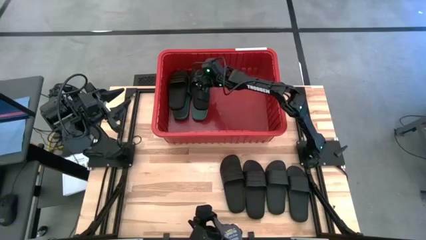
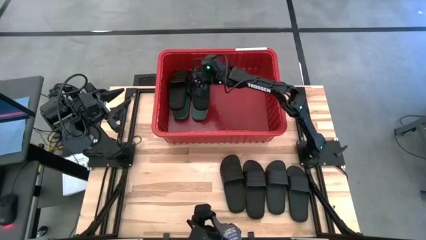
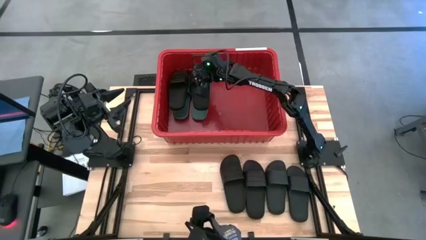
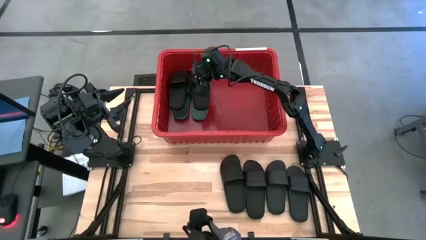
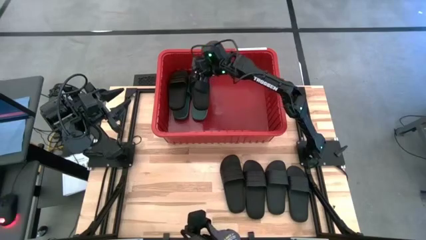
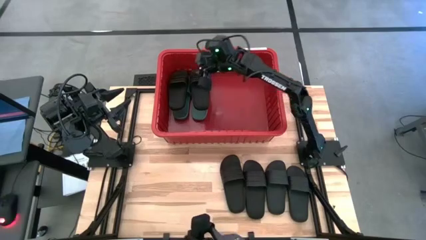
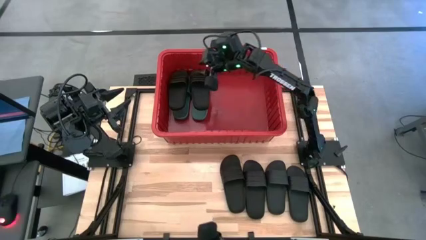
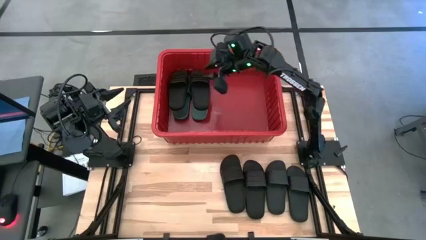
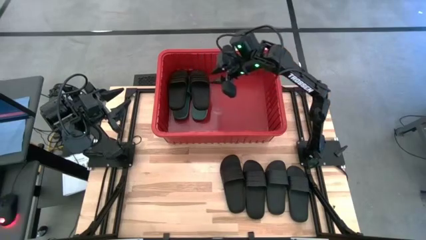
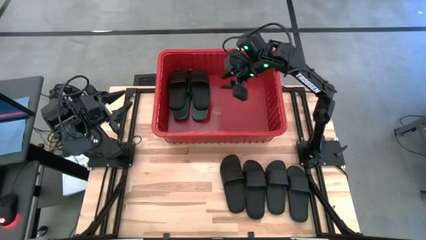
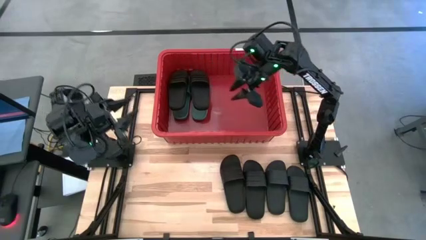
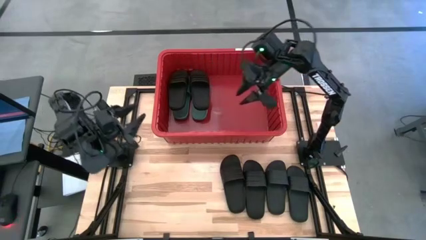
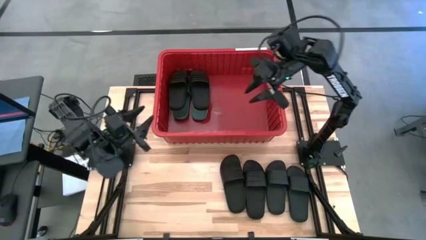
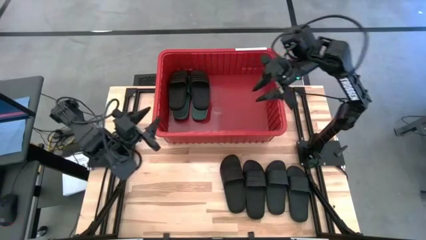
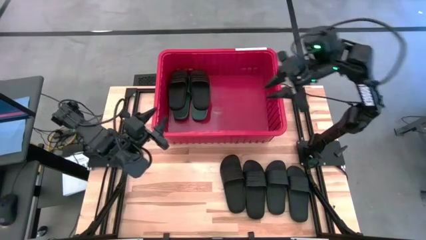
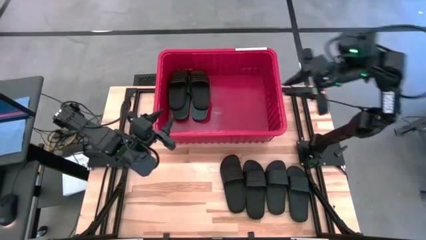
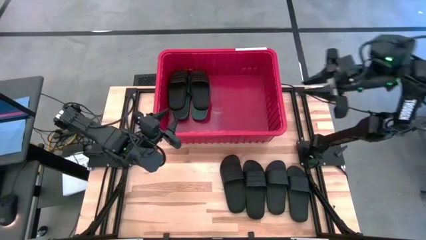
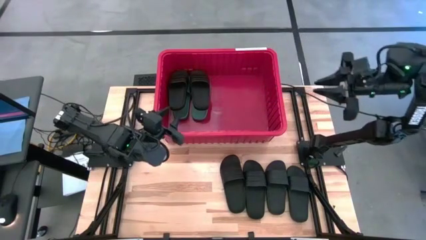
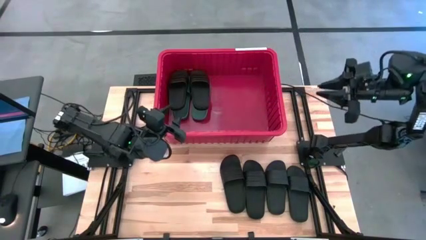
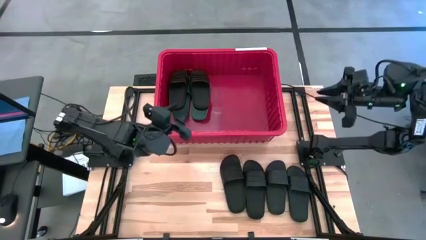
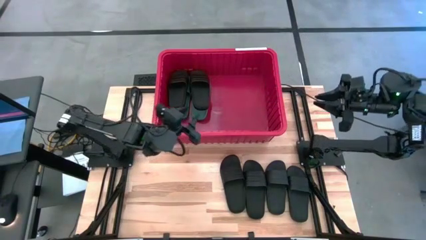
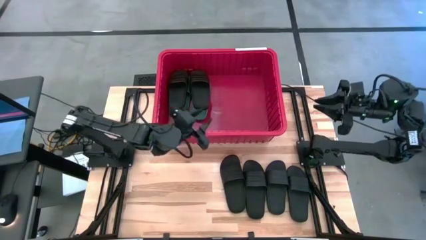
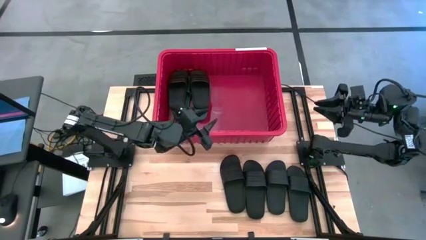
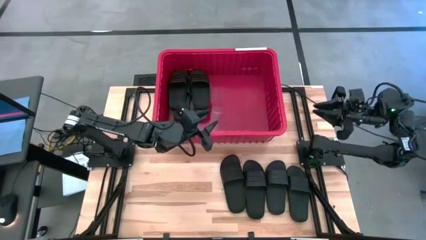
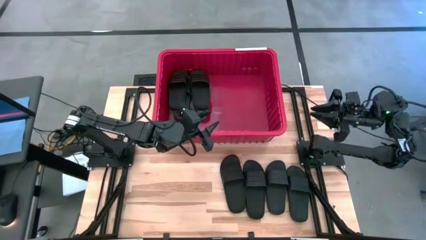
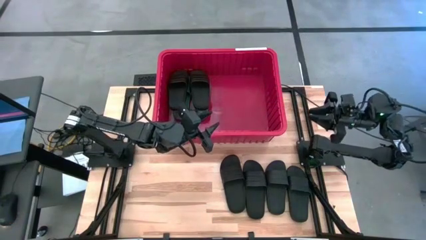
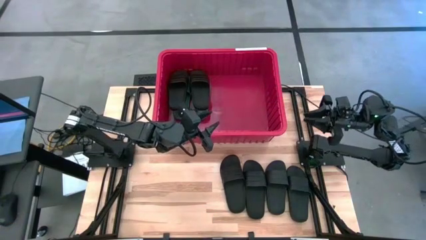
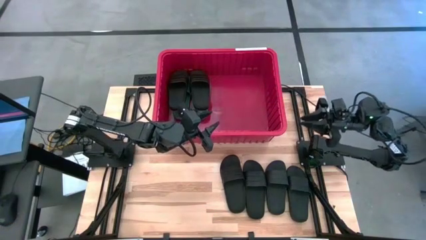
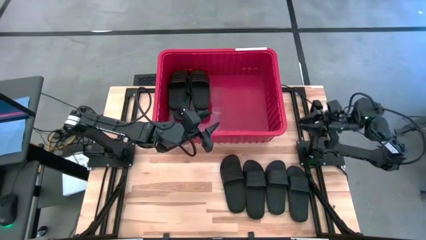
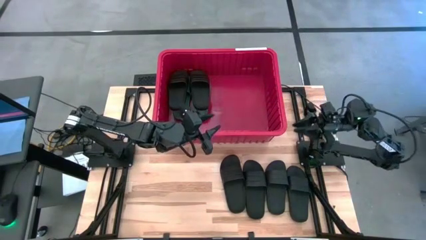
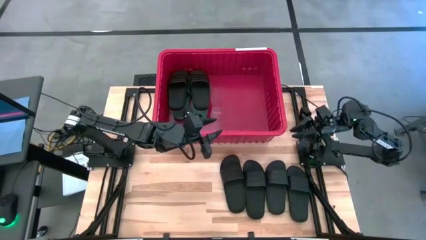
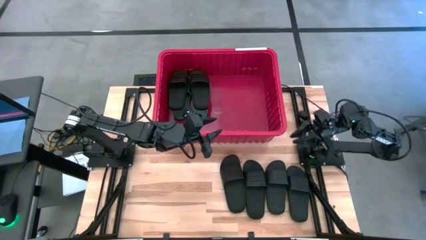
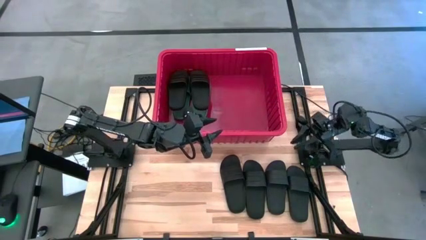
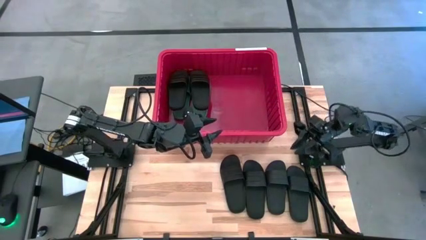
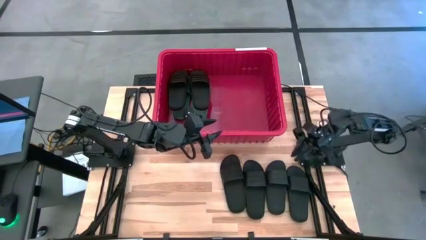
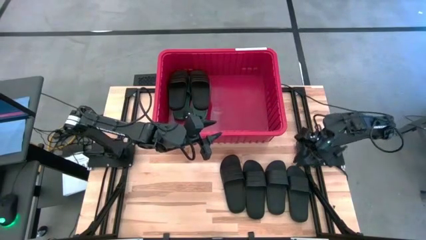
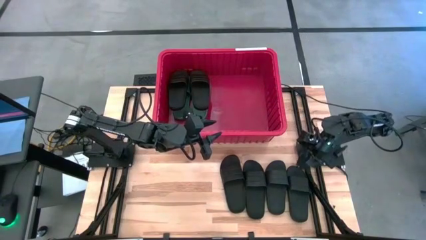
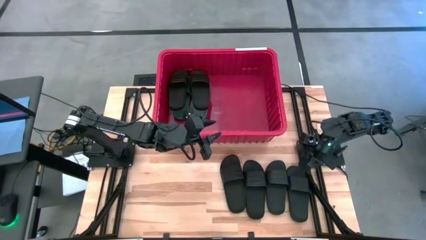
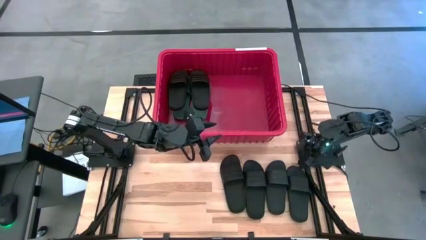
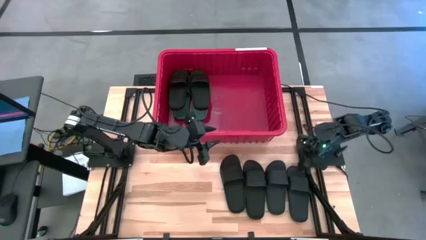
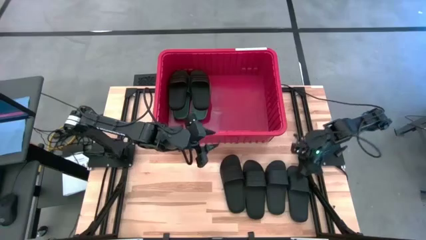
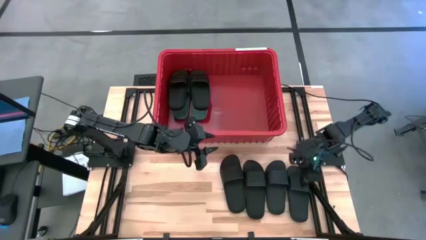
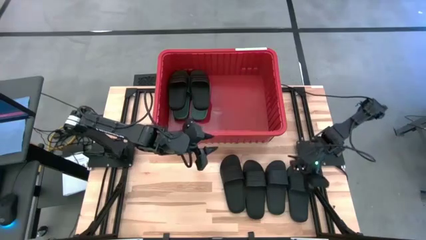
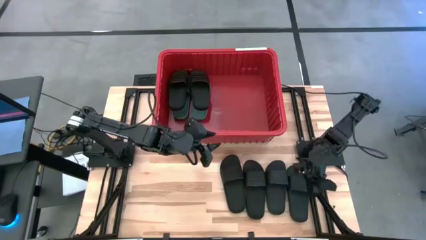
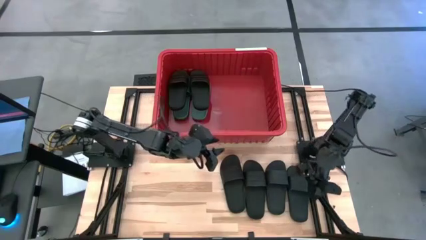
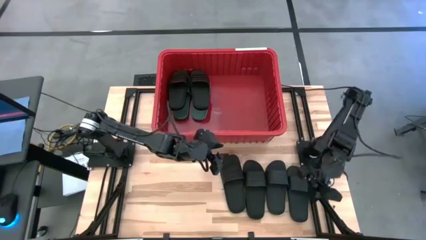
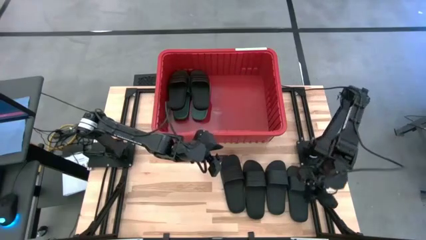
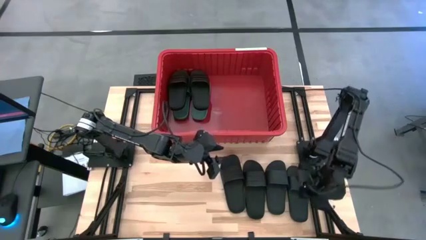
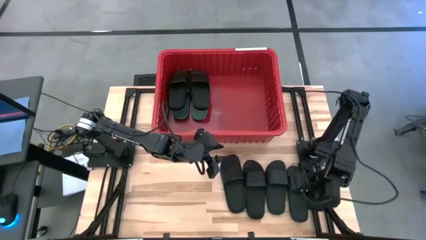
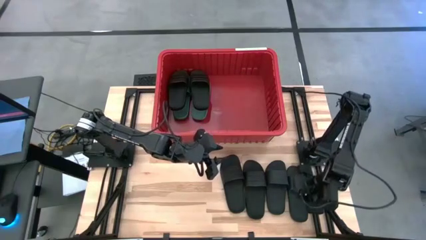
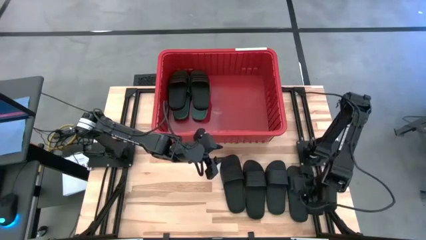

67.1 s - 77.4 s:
Task: Pick and place slides into bin
Put the black slide into the red bin

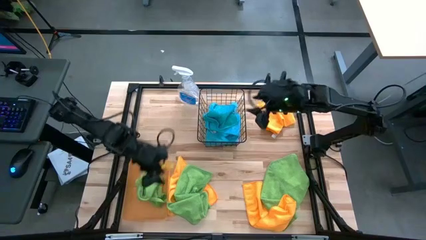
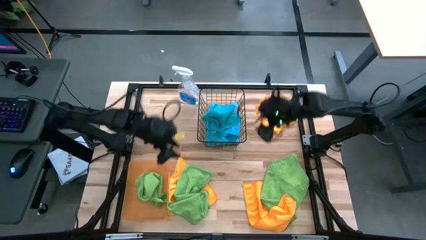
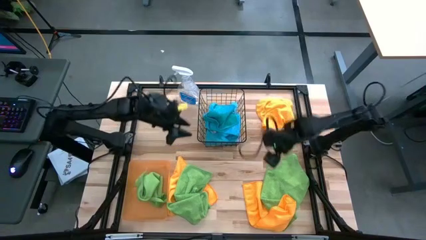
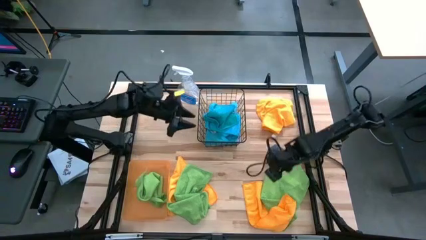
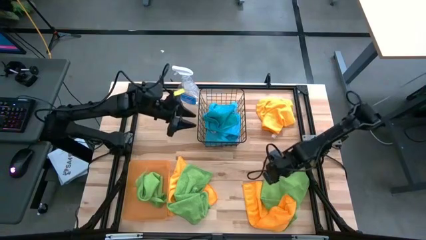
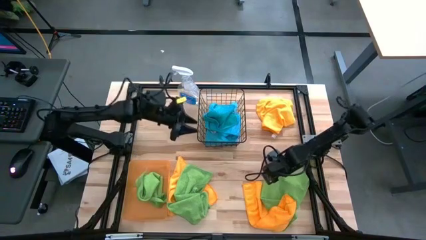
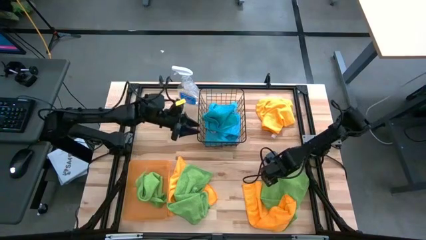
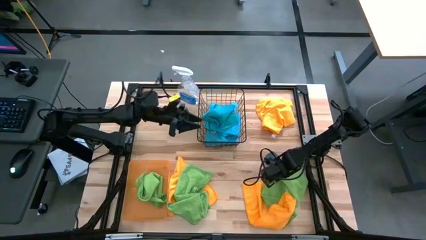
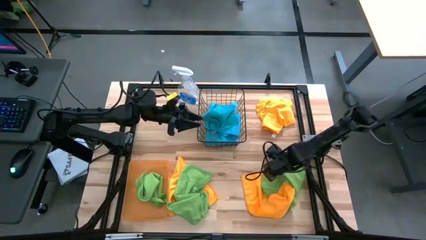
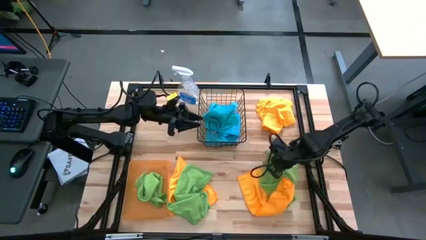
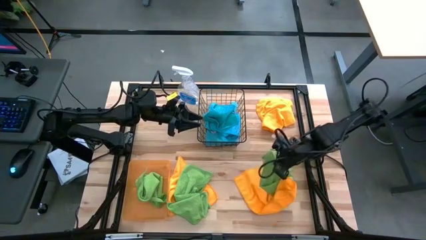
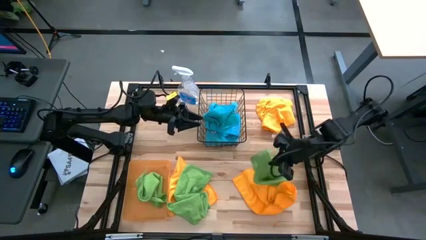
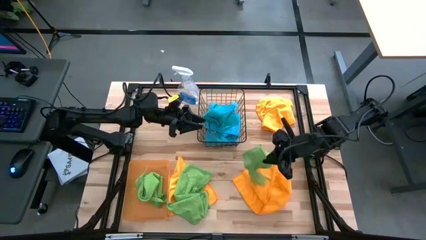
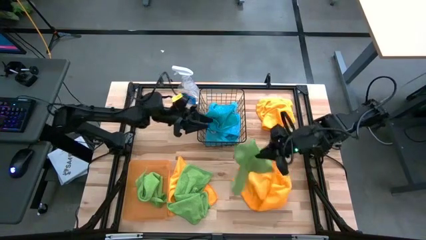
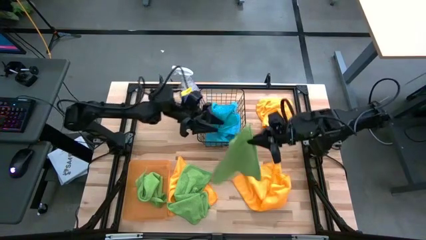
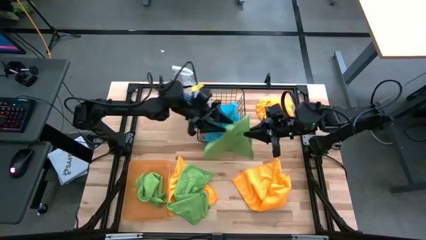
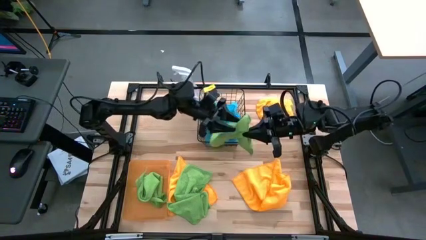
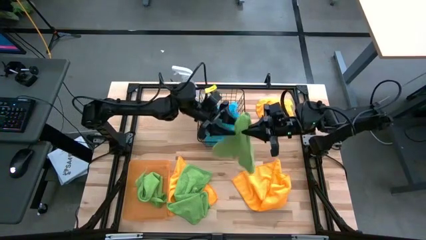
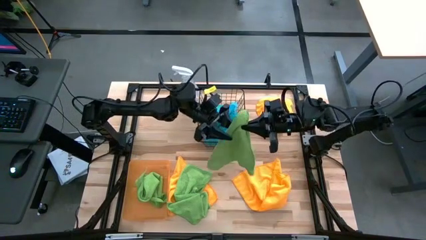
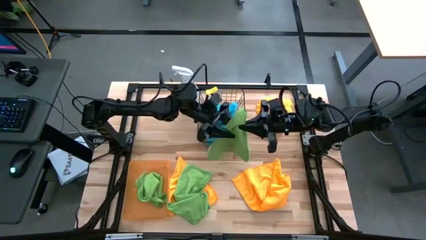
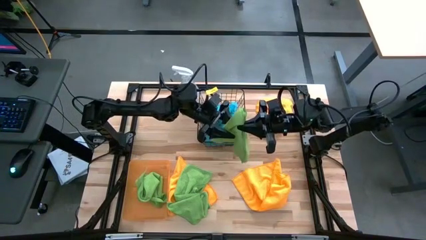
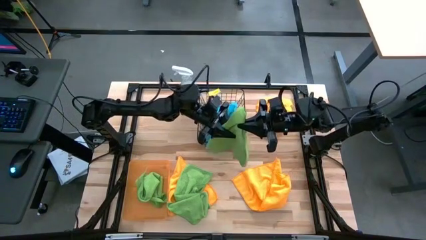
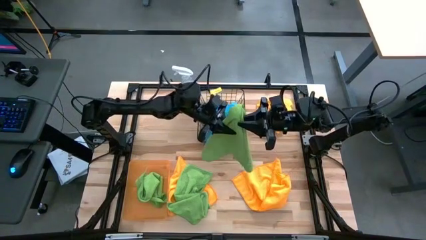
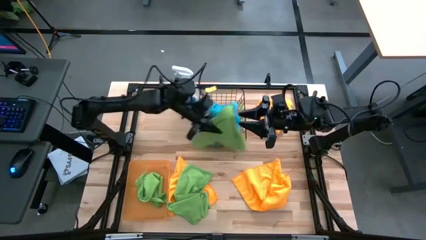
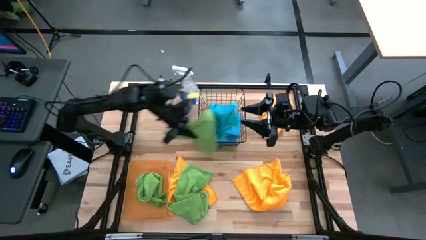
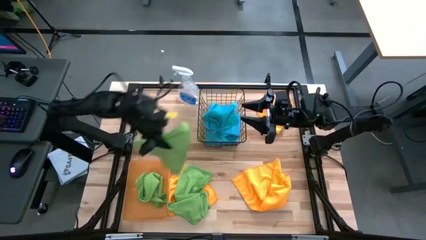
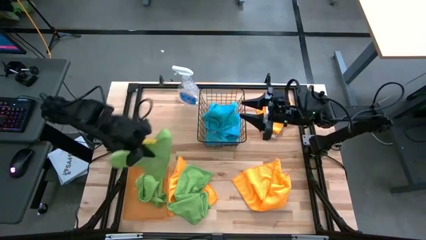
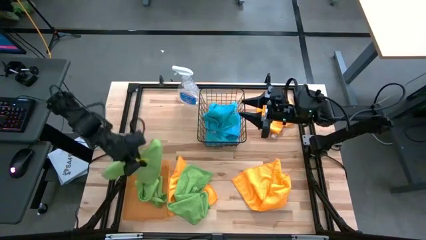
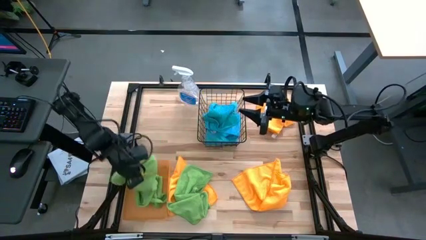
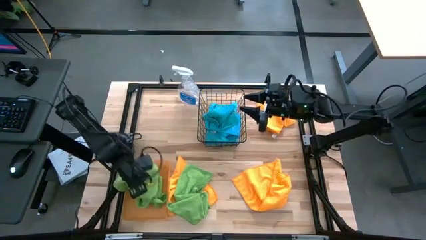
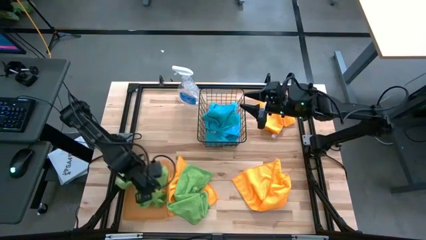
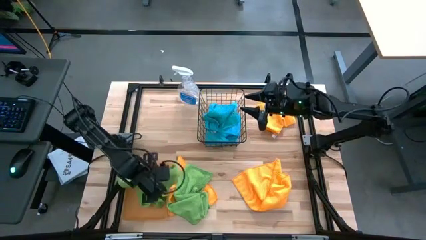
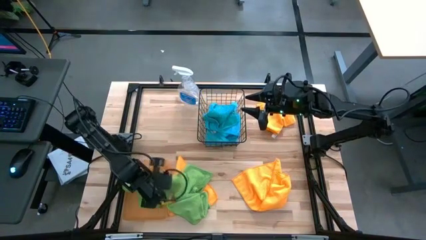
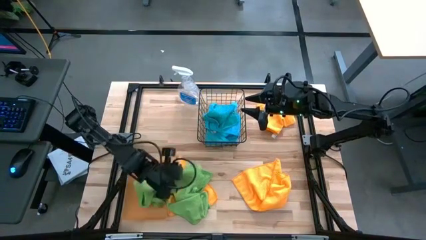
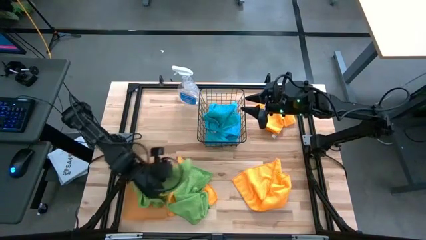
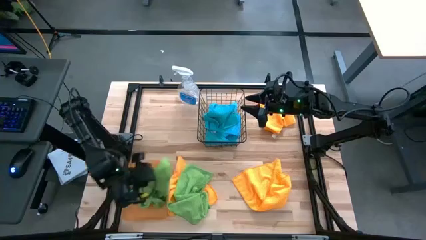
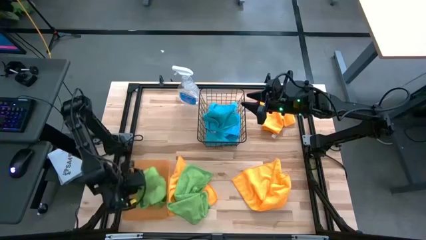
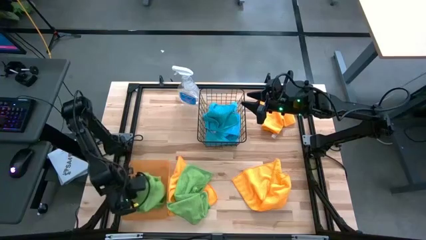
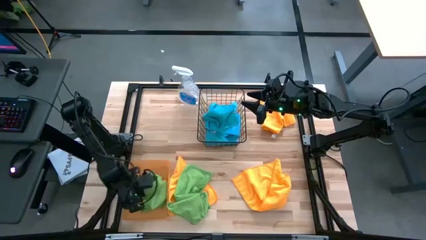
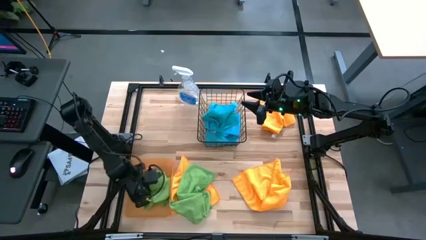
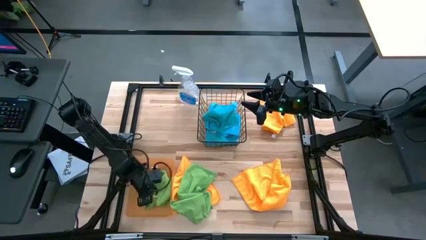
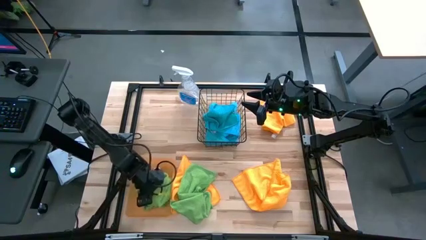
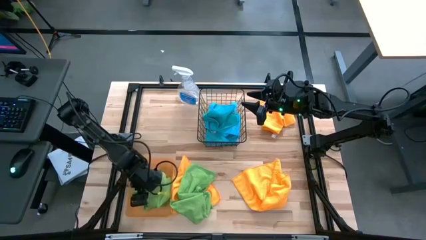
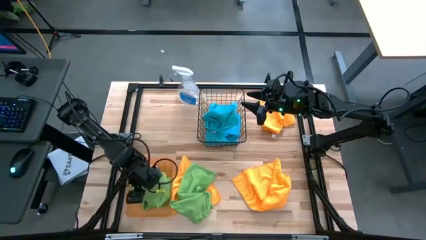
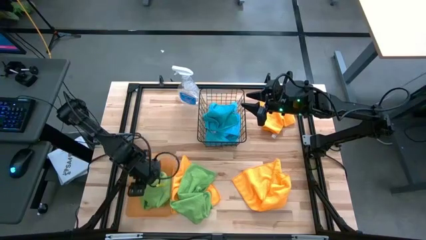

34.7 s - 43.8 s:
Task: Sort microfiber towel by color & place in baskets
Put the right green towel into the orange bin
